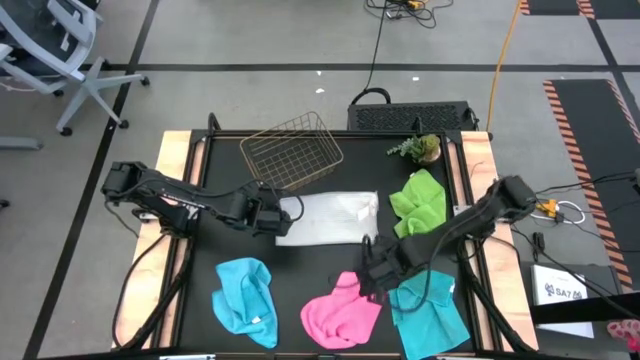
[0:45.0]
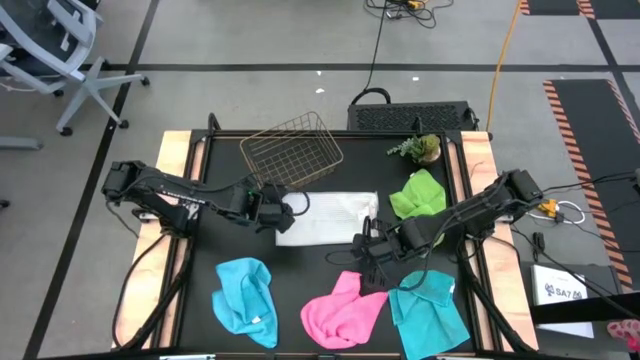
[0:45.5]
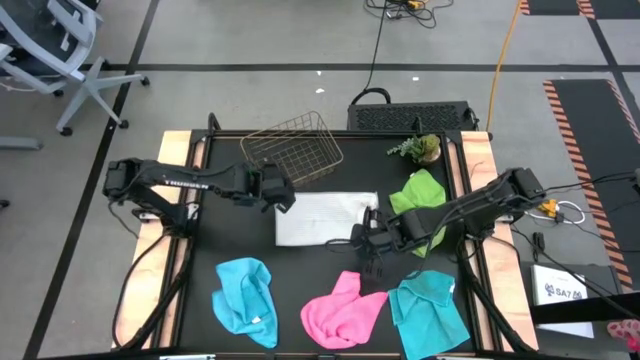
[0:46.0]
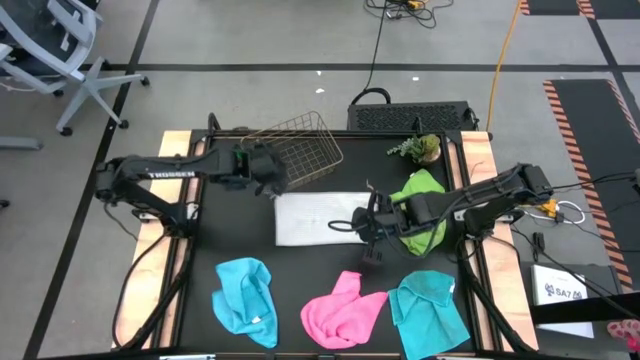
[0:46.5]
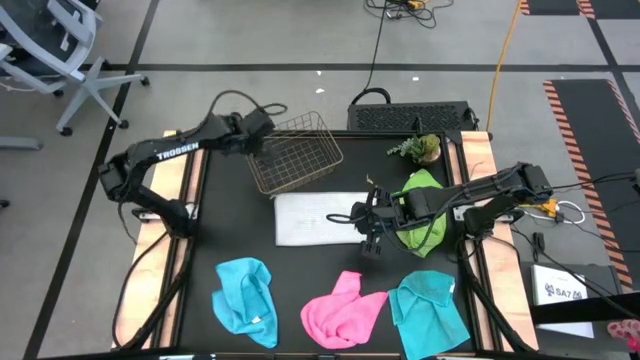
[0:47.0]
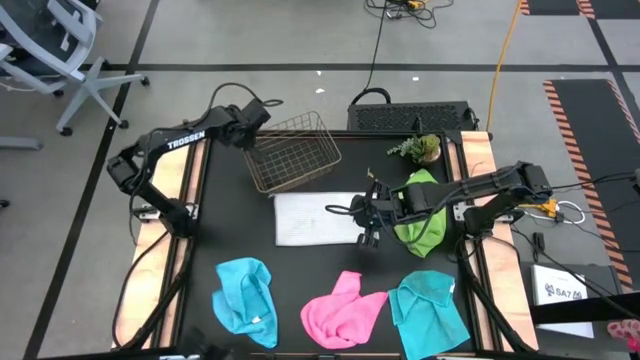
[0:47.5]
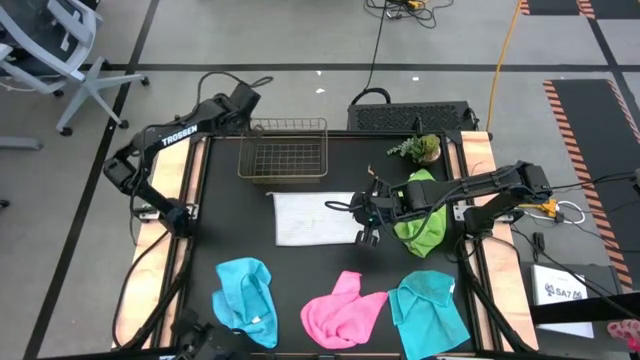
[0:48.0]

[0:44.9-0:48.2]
Task: Fold microfiber towels
Adjust the wire basket

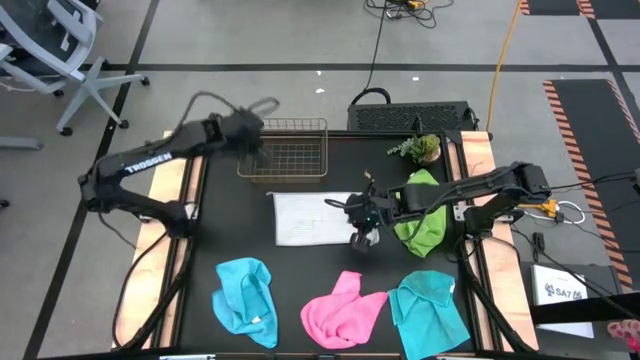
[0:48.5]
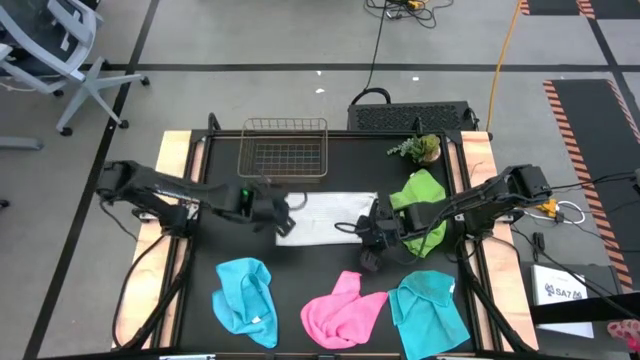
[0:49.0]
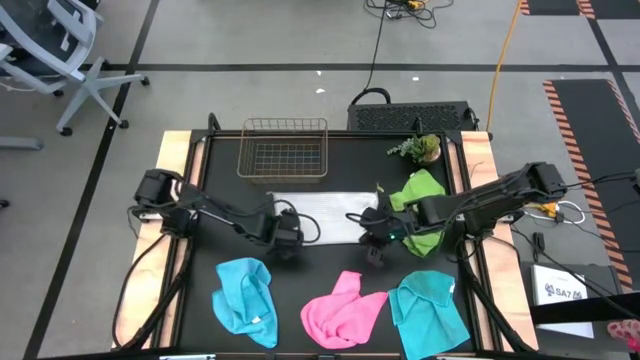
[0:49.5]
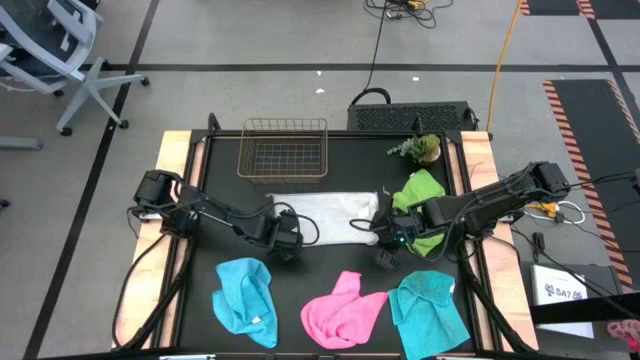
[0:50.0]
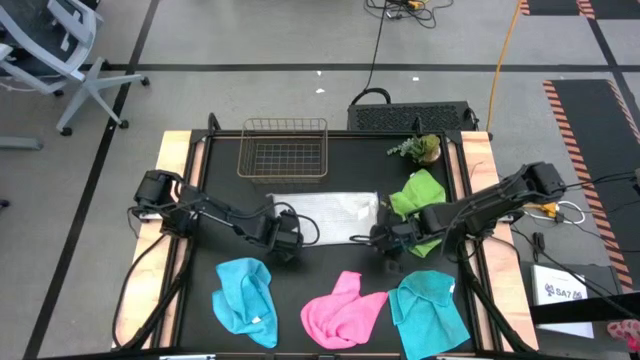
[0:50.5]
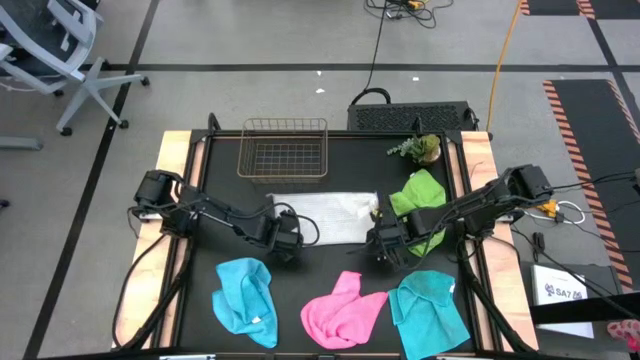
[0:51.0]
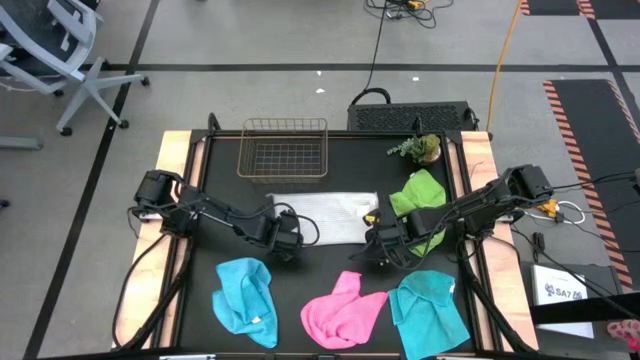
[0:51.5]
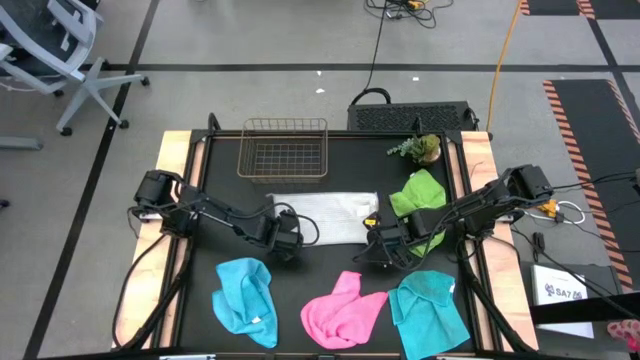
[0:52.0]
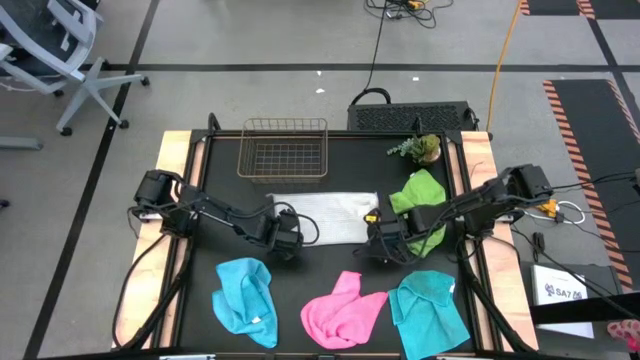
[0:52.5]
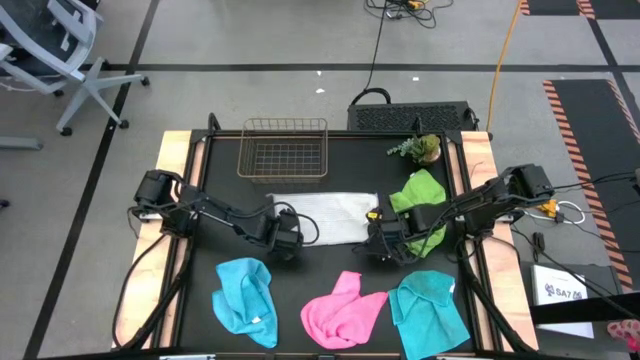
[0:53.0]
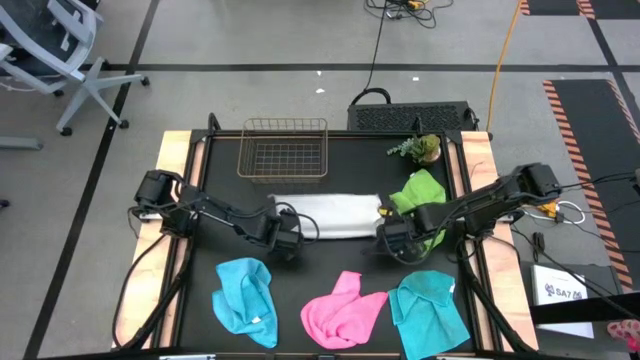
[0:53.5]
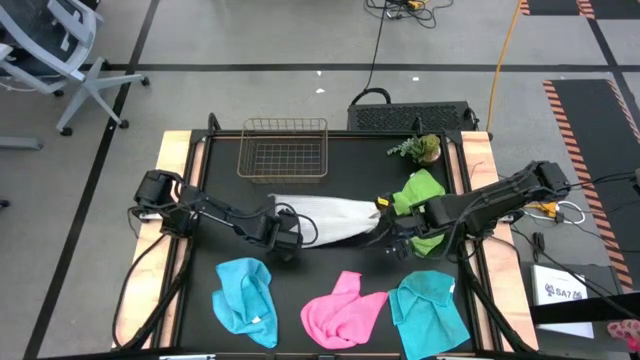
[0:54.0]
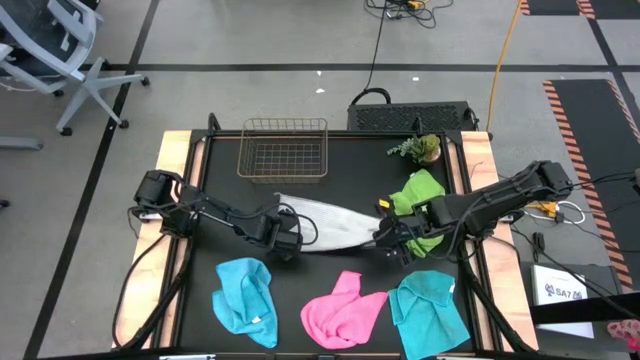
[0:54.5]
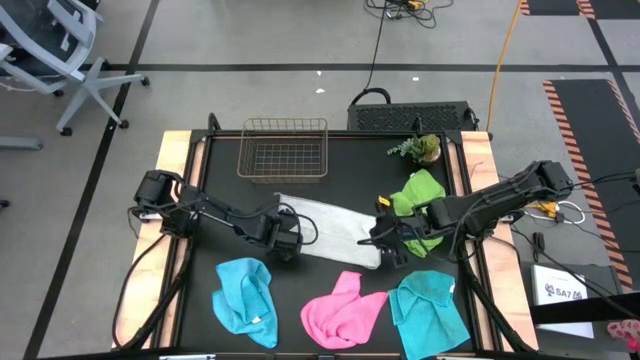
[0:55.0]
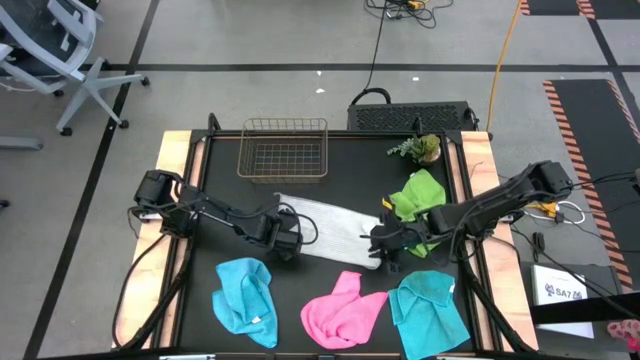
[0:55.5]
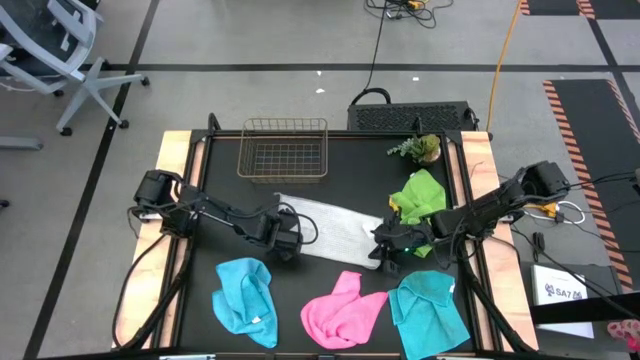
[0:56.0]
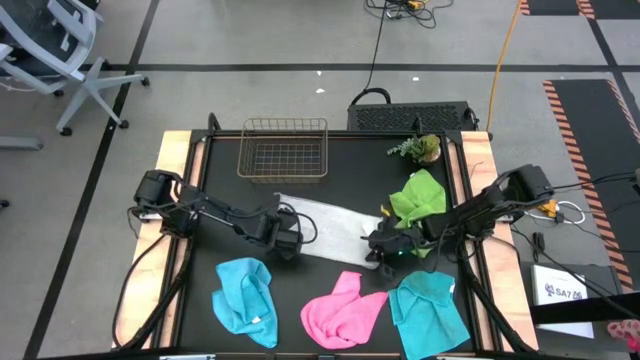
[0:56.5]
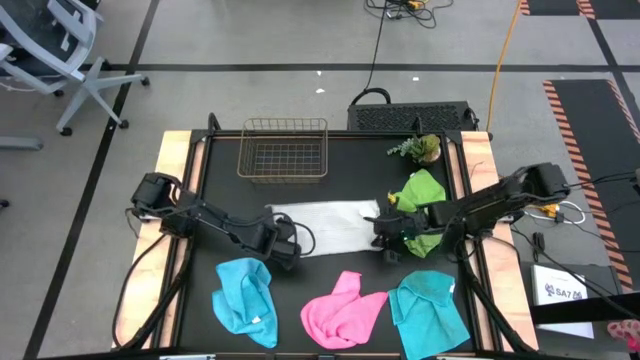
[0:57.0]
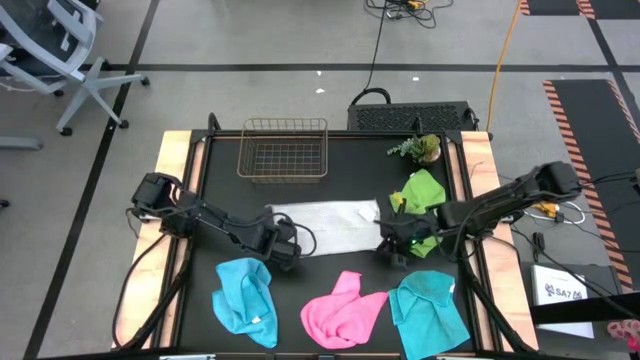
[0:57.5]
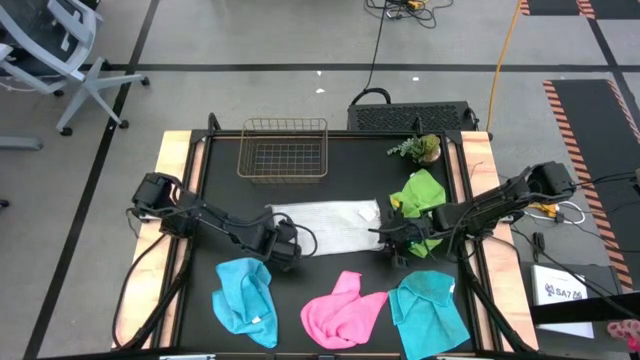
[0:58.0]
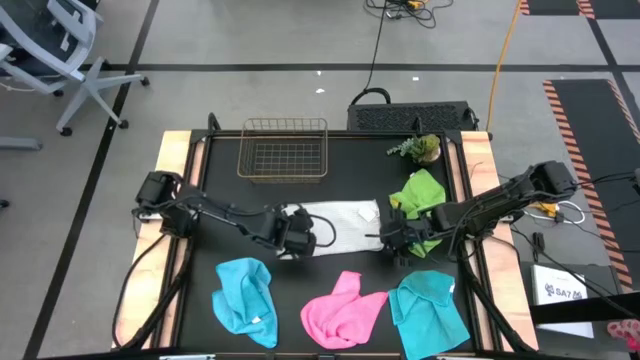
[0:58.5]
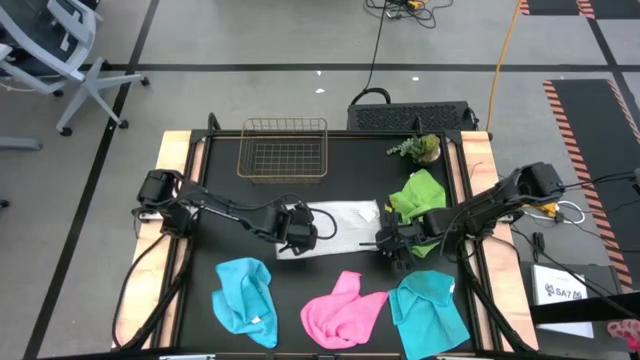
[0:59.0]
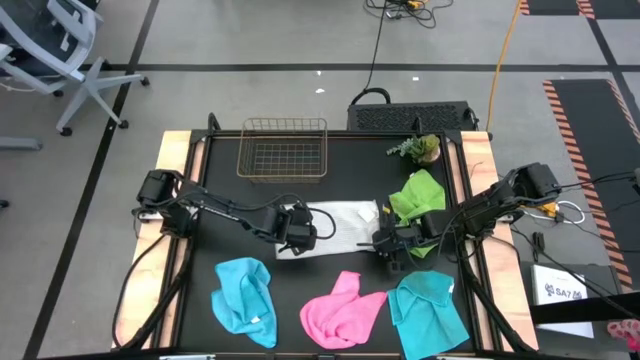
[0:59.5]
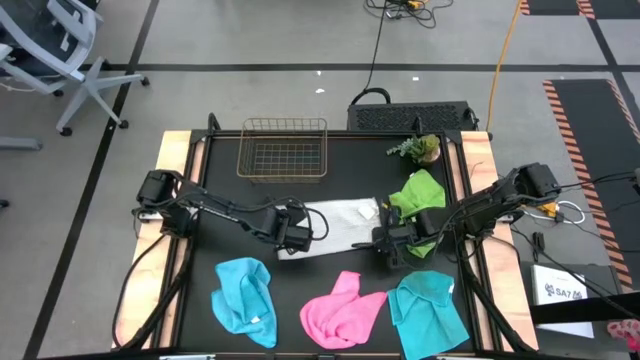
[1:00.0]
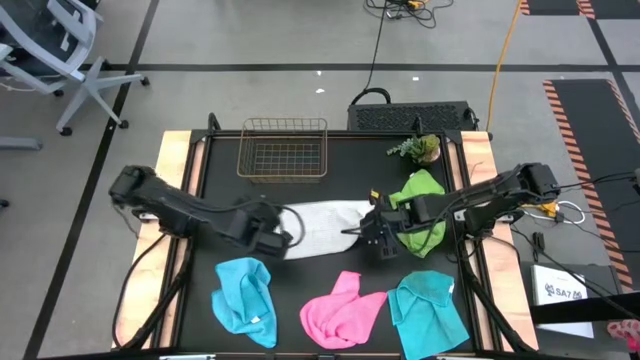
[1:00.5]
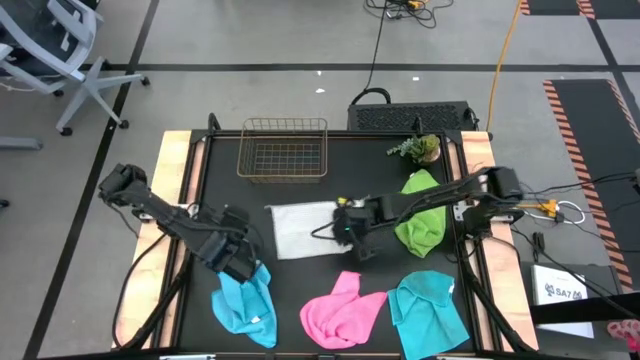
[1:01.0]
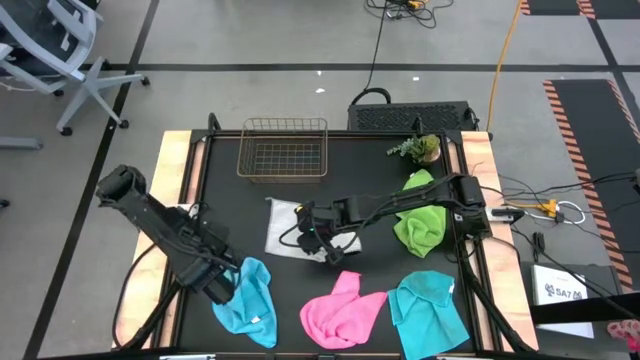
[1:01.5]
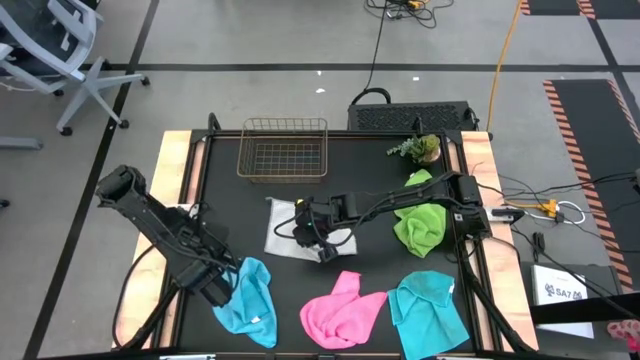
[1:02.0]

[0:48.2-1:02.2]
Fold the gray microfiber cloth

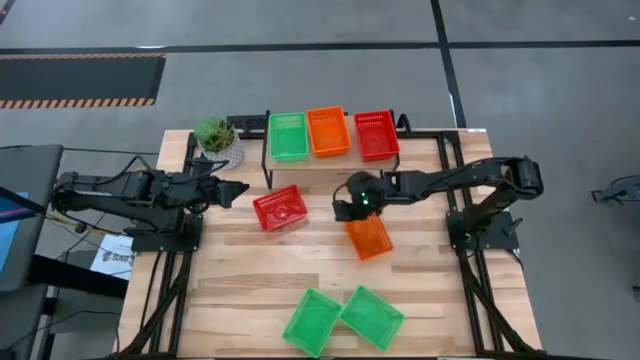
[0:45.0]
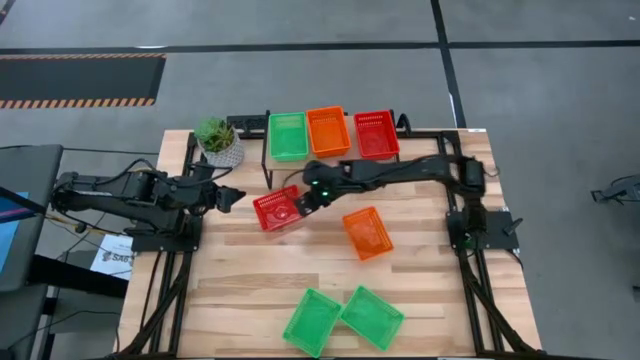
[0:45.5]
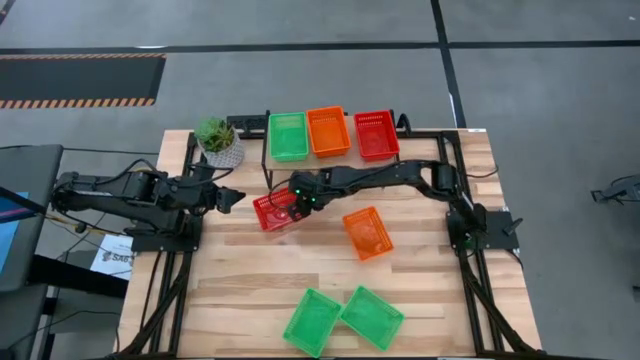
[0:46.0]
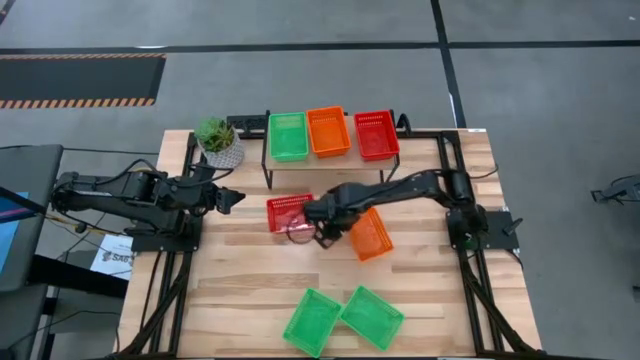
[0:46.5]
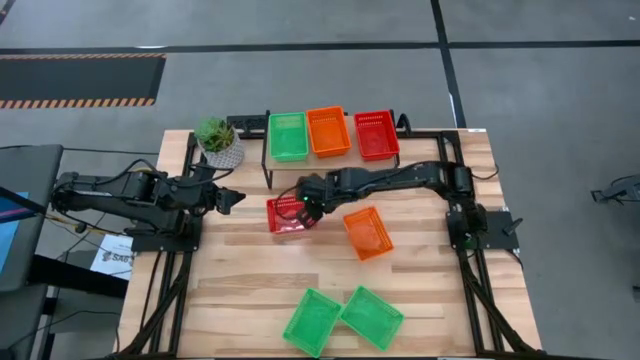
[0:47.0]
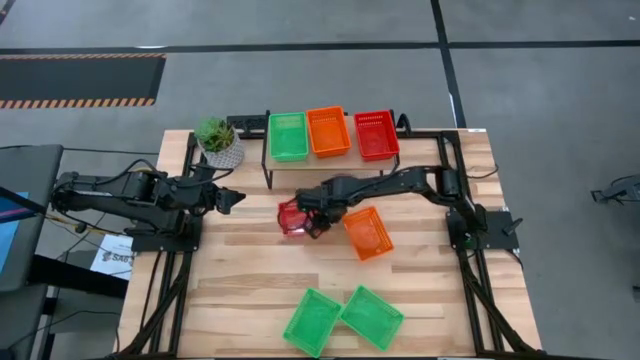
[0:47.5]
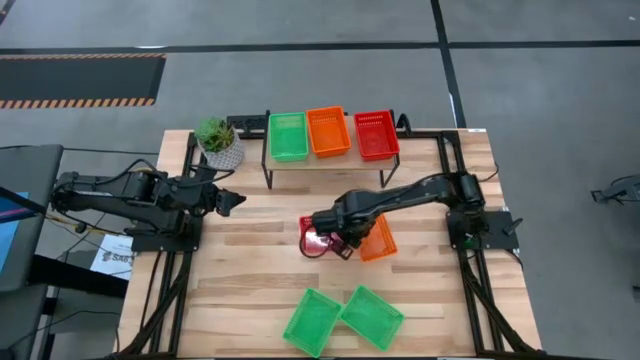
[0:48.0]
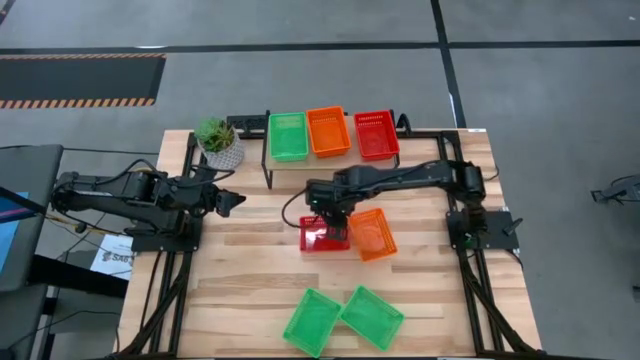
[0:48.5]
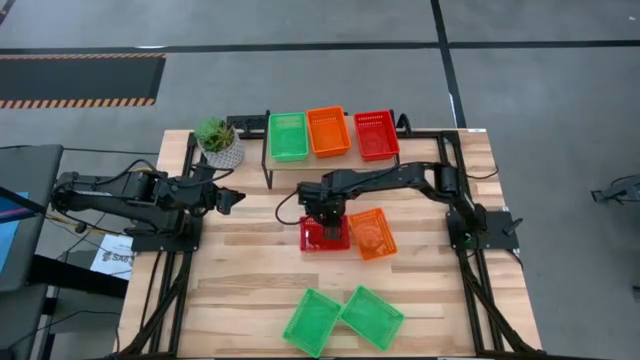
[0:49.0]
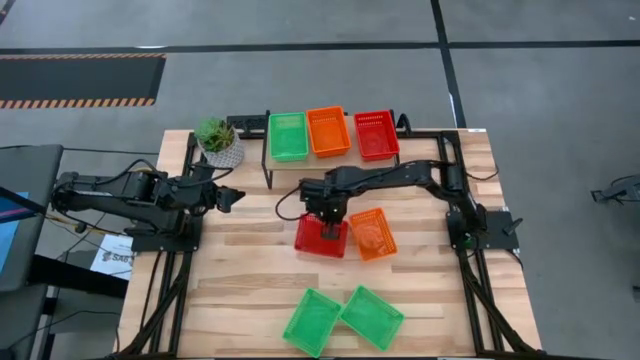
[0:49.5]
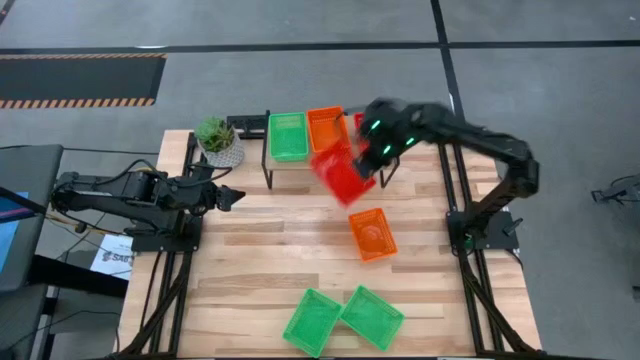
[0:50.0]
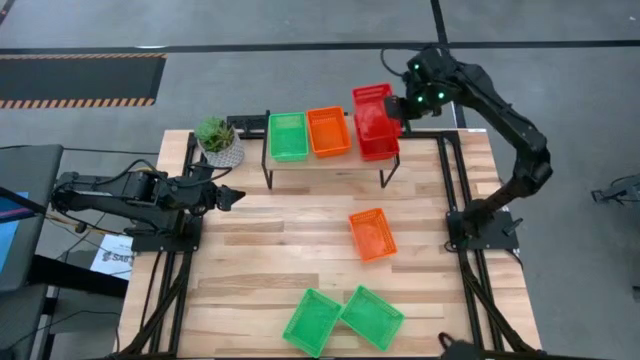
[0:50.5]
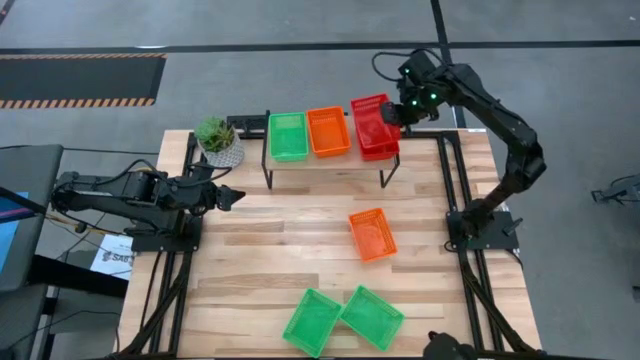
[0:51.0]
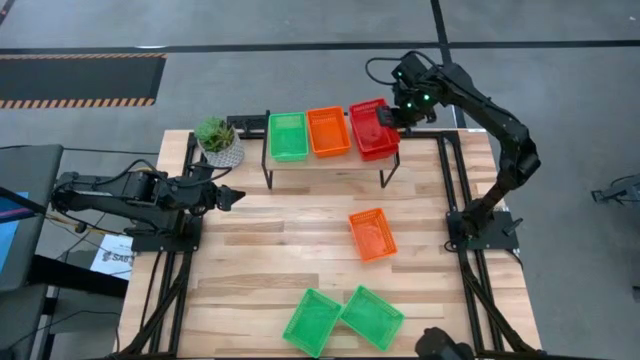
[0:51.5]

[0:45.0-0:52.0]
Task: Stack baskets on shelf by color
Stack the red bin on top of the red bin on the shelf
